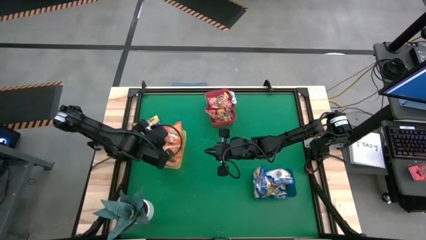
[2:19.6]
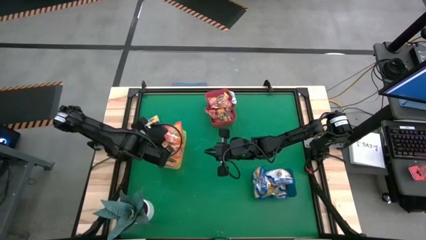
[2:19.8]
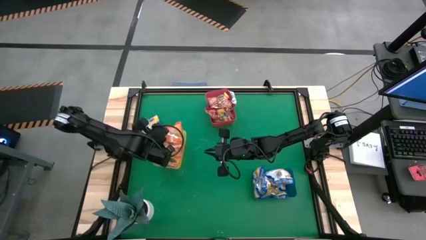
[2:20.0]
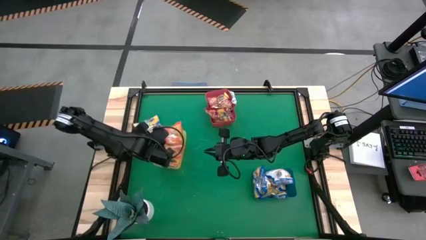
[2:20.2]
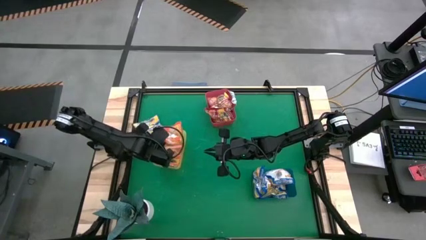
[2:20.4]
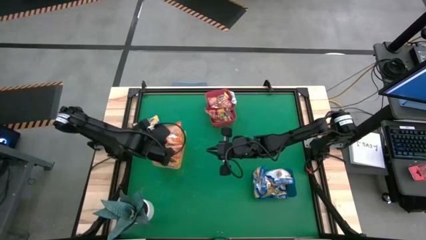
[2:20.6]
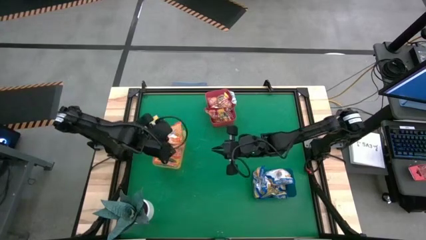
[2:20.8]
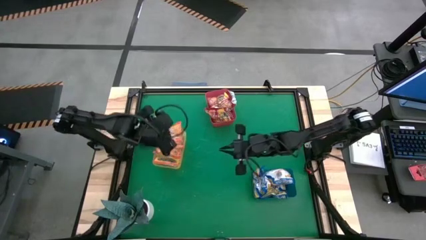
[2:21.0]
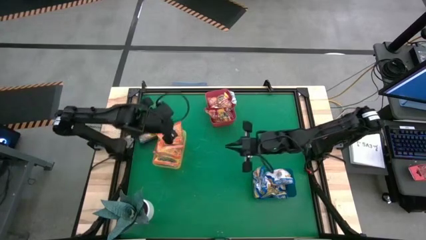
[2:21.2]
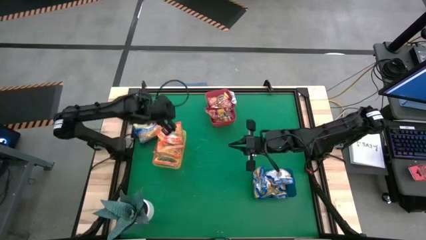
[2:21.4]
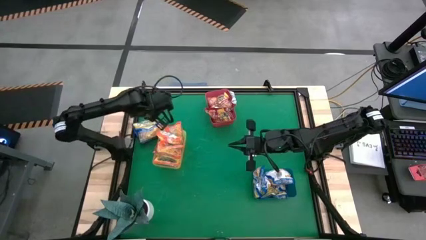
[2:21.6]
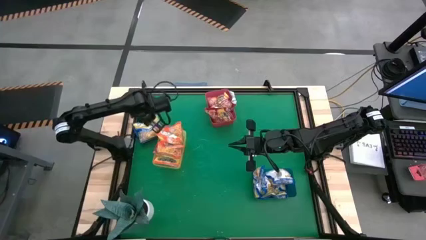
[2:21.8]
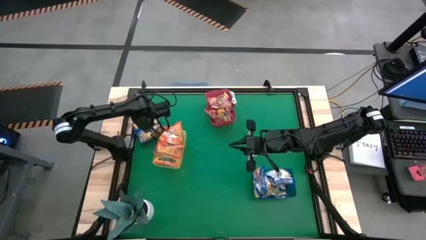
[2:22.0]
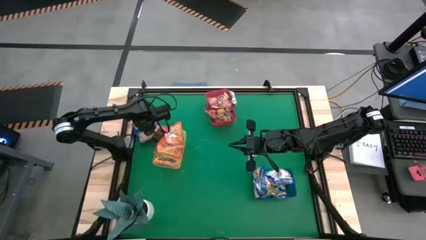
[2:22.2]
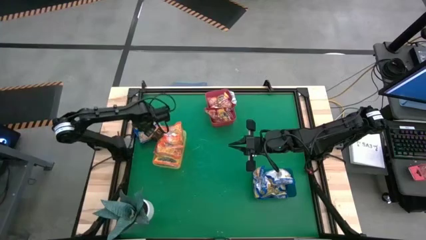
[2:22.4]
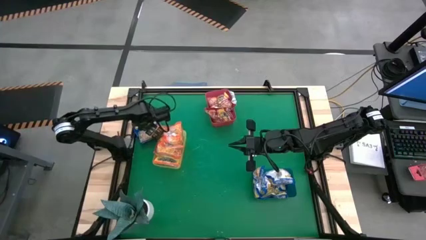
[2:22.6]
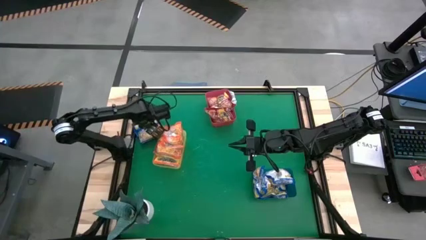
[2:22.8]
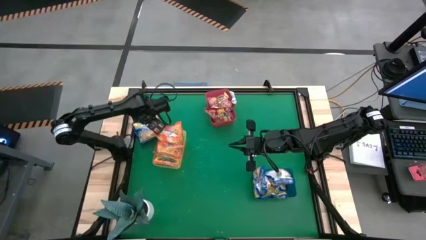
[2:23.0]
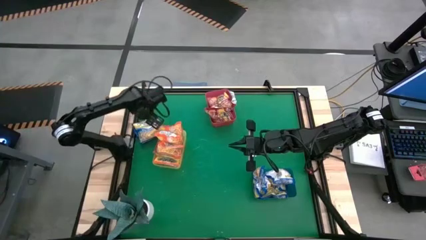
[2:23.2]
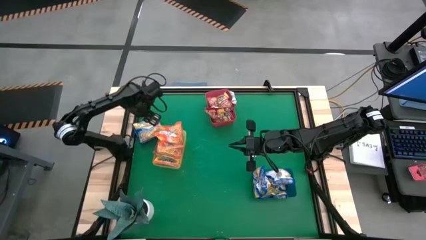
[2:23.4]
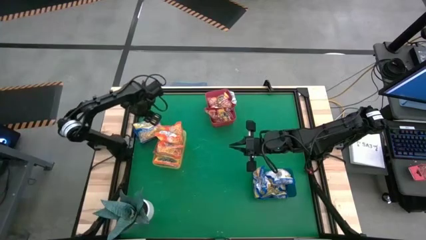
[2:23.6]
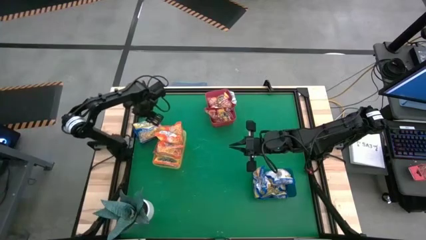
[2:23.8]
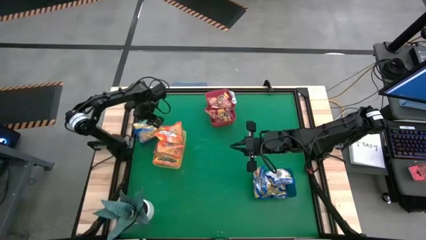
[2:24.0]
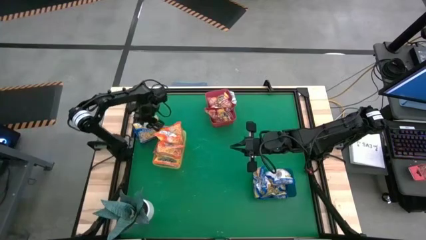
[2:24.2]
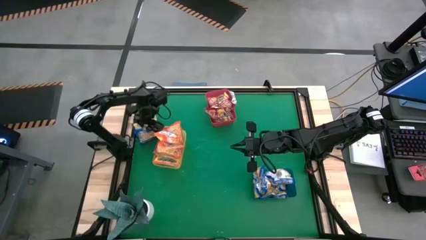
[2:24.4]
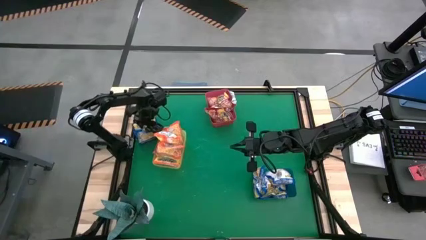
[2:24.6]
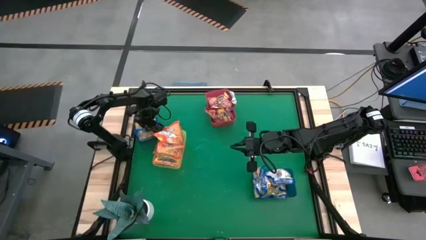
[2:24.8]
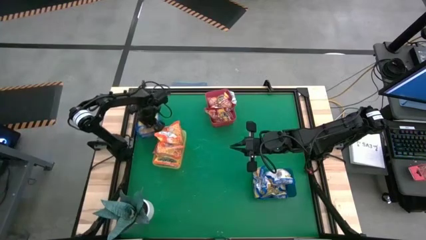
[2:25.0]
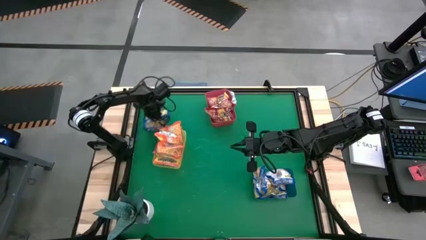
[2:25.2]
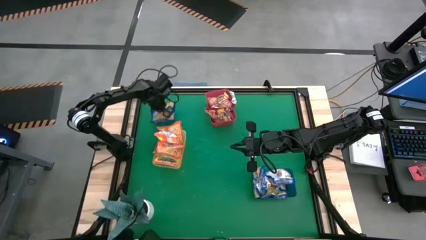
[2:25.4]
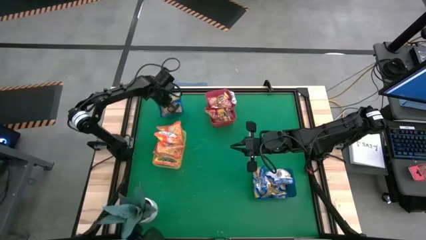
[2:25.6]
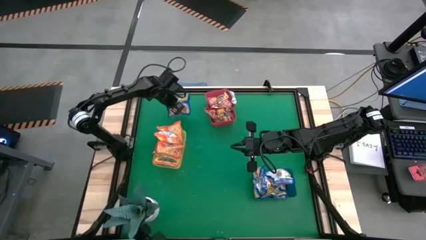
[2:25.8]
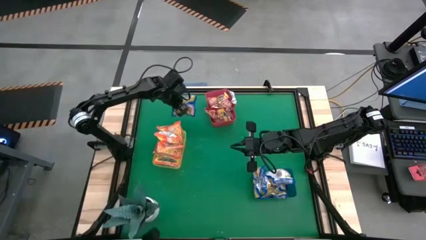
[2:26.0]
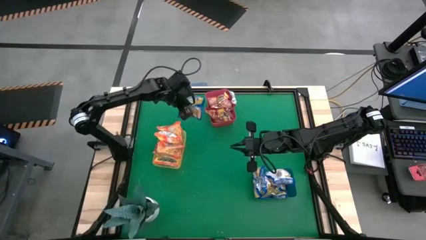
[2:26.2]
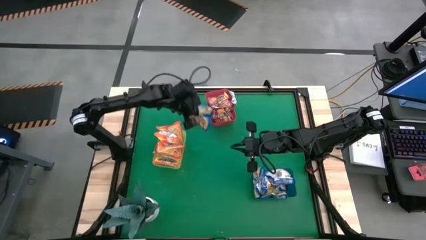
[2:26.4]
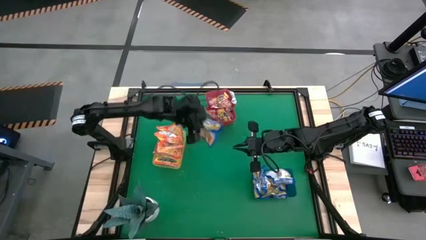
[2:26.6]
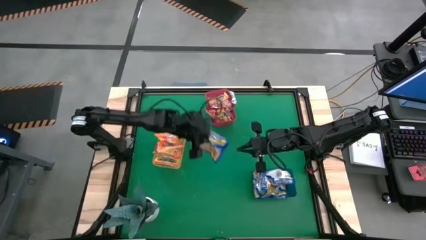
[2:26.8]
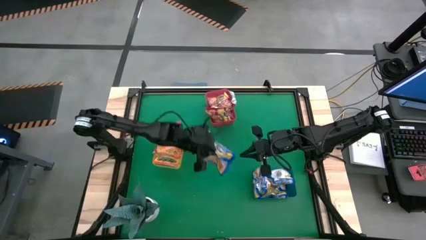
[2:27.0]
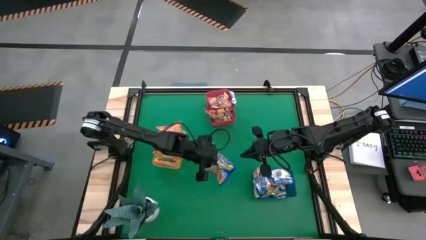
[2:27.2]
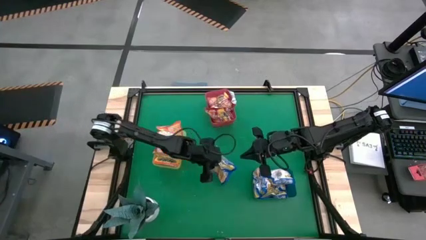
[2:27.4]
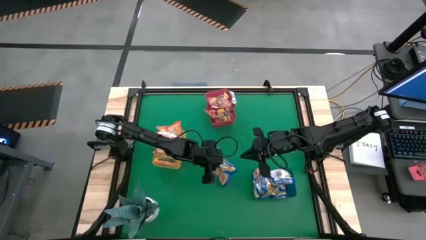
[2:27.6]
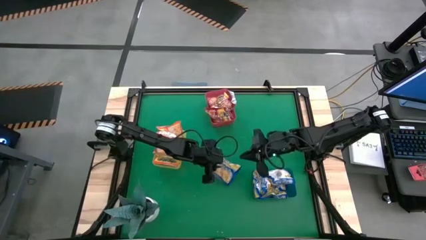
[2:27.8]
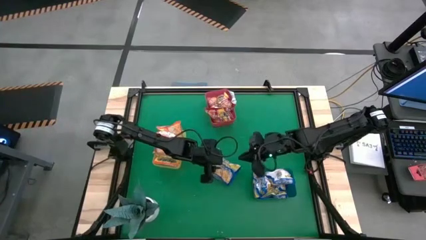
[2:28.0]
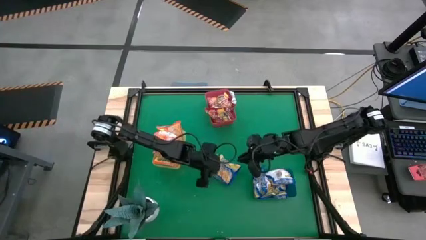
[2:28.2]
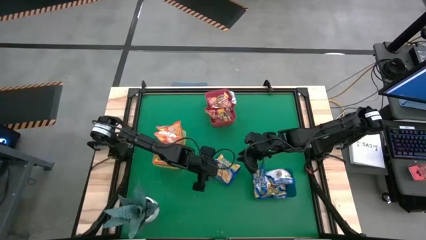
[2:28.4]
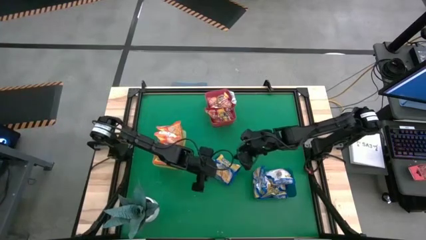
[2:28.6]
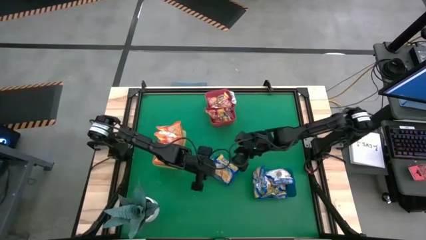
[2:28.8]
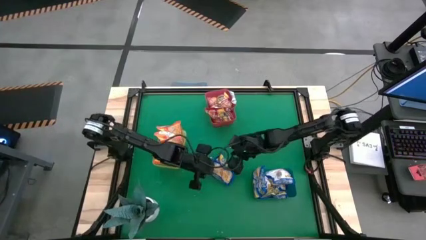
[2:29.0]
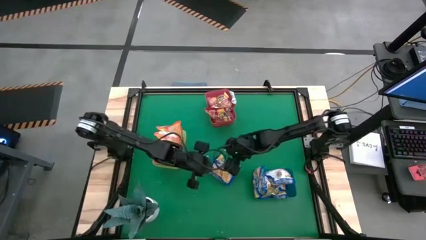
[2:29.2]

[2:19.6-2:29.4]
Task: Sort Maruchan noodles
Put the blue noodle pack into the blue bin

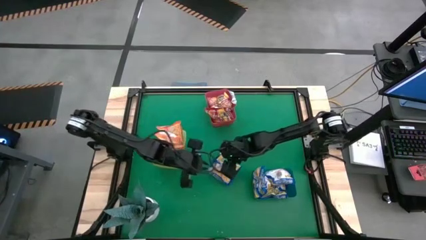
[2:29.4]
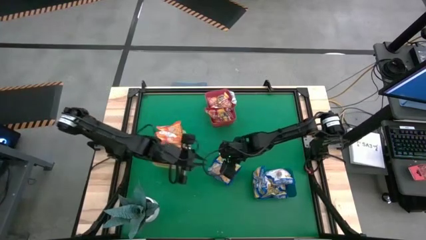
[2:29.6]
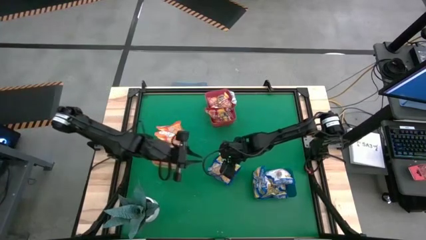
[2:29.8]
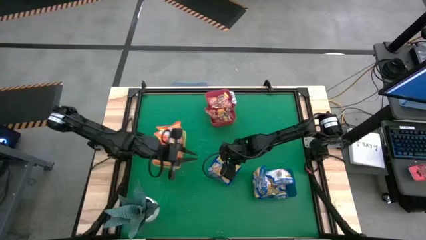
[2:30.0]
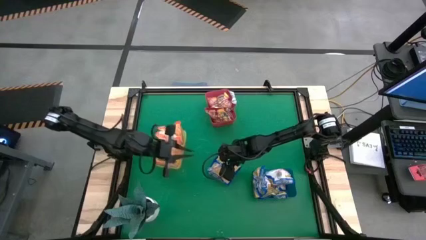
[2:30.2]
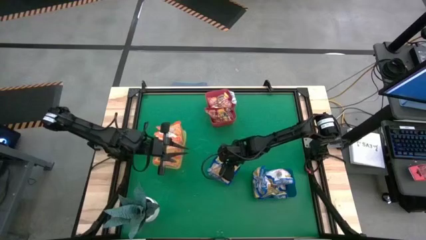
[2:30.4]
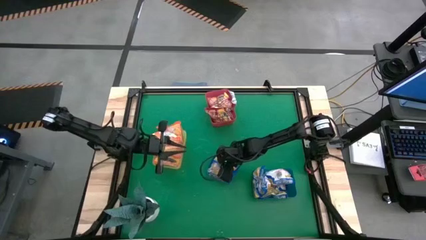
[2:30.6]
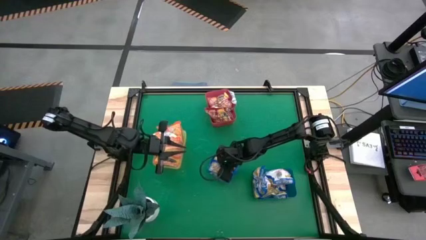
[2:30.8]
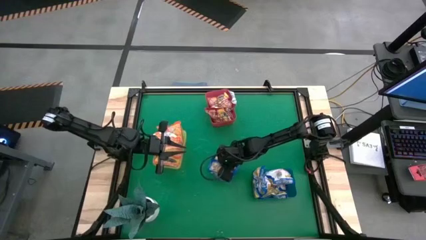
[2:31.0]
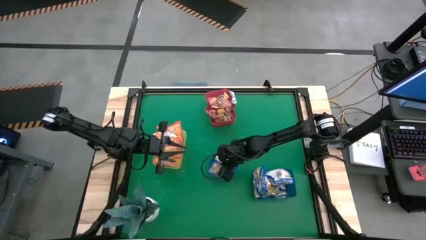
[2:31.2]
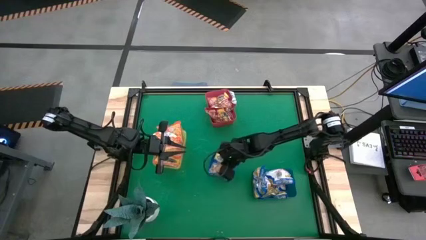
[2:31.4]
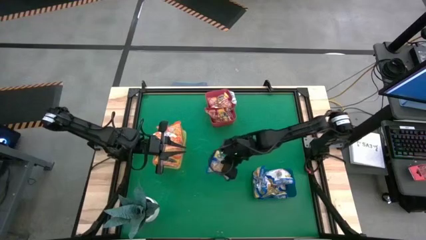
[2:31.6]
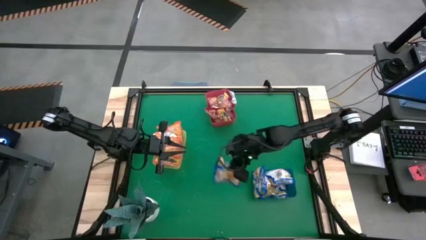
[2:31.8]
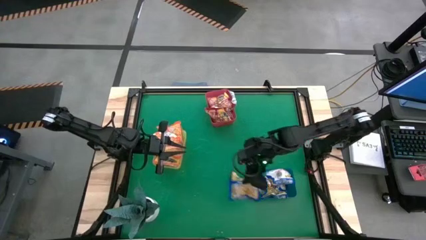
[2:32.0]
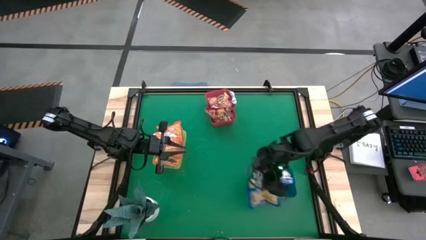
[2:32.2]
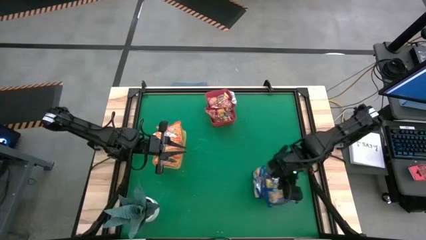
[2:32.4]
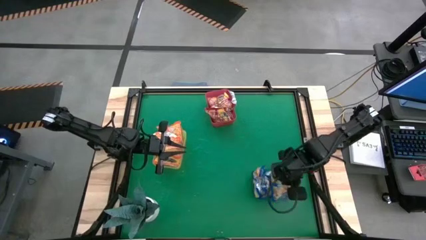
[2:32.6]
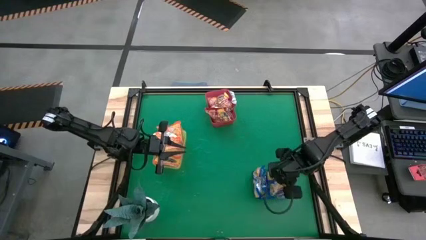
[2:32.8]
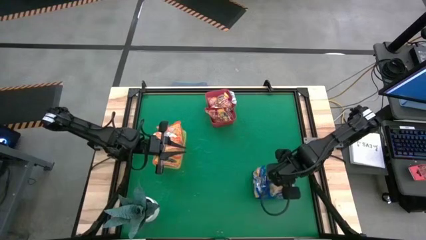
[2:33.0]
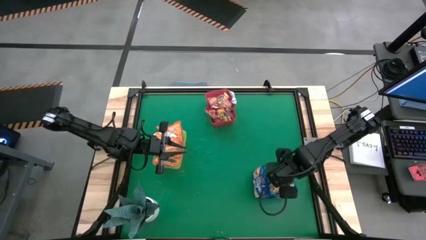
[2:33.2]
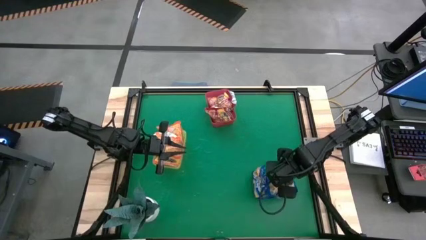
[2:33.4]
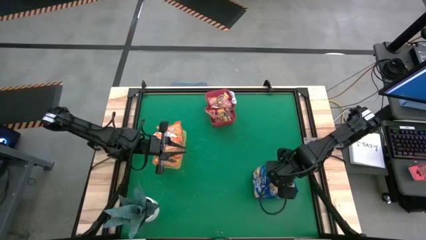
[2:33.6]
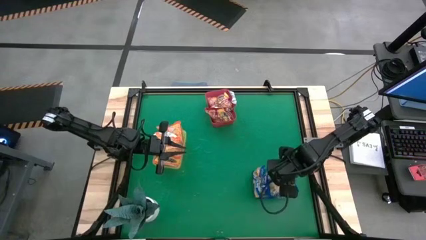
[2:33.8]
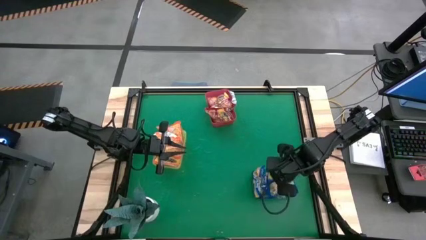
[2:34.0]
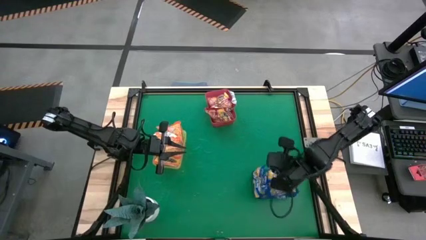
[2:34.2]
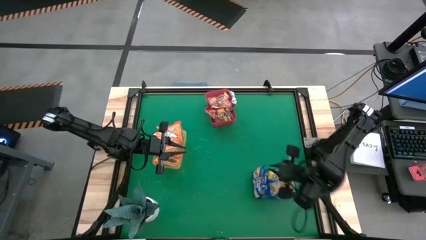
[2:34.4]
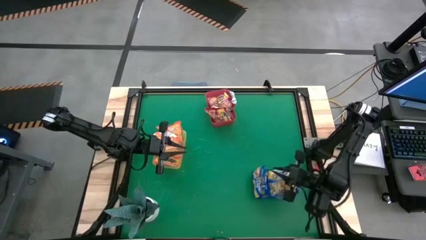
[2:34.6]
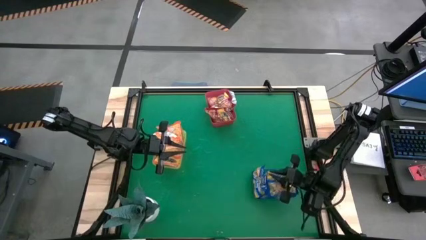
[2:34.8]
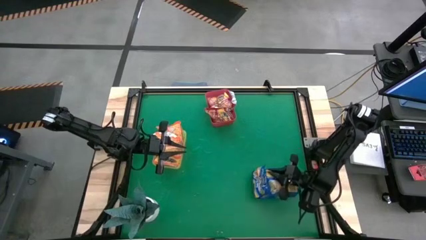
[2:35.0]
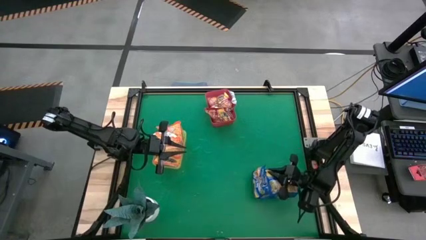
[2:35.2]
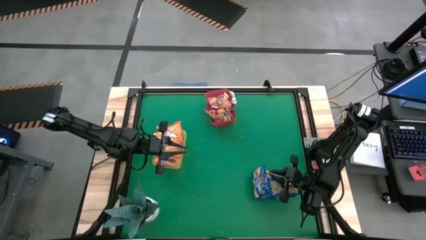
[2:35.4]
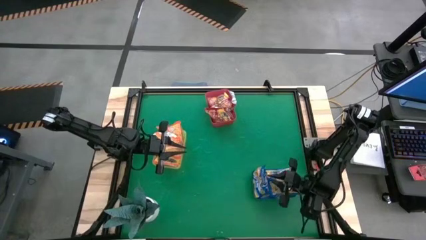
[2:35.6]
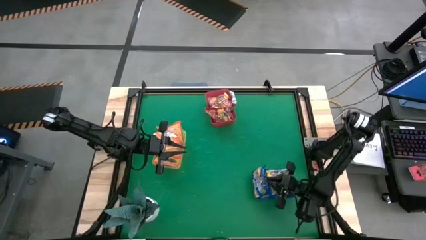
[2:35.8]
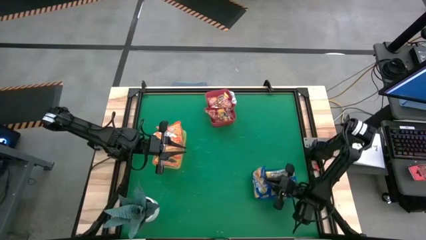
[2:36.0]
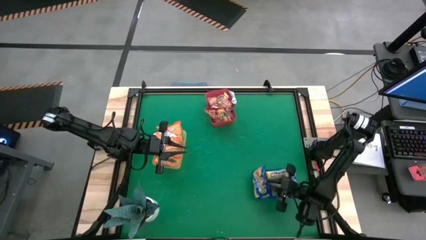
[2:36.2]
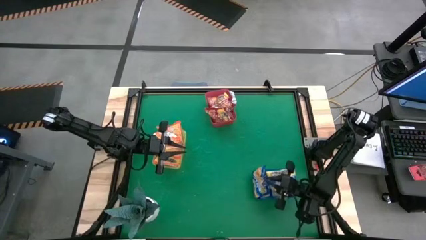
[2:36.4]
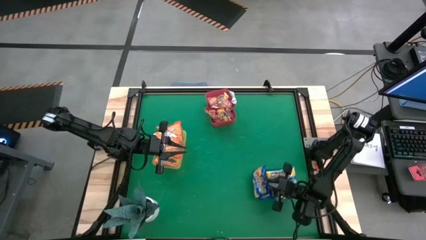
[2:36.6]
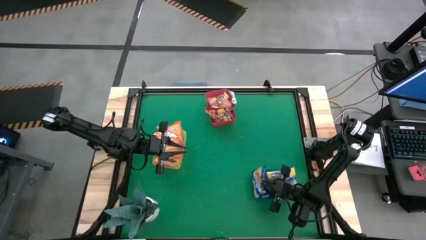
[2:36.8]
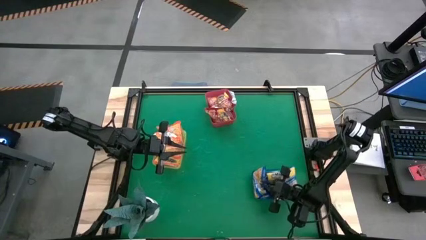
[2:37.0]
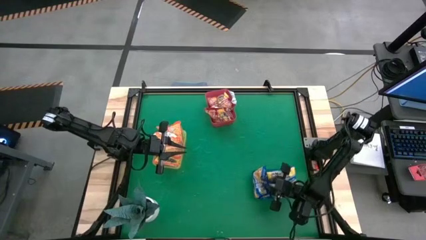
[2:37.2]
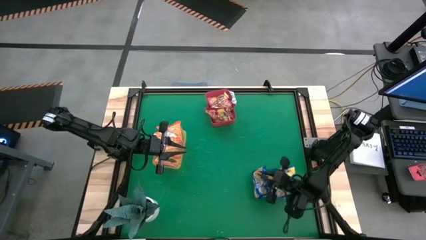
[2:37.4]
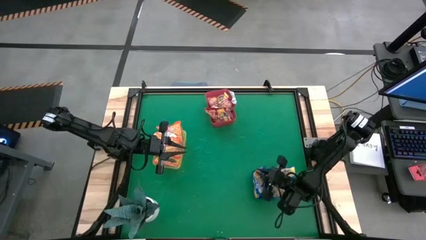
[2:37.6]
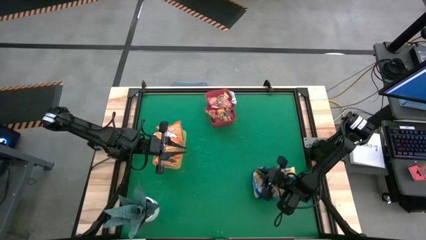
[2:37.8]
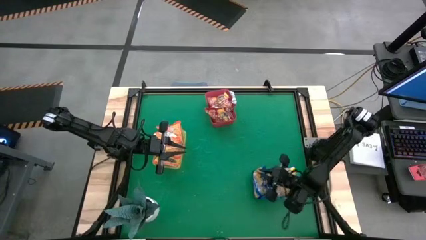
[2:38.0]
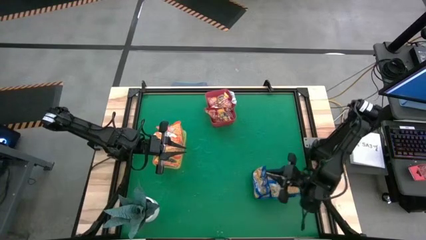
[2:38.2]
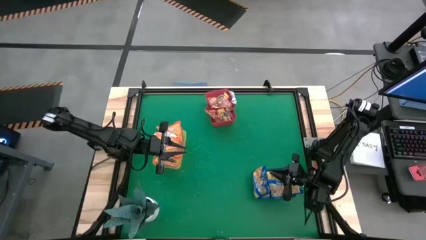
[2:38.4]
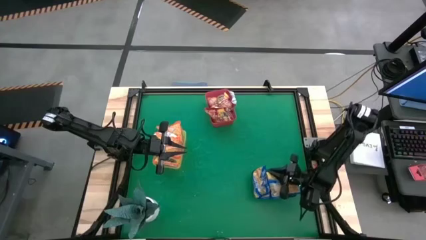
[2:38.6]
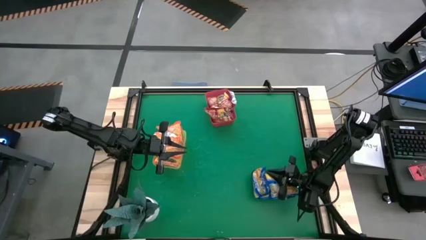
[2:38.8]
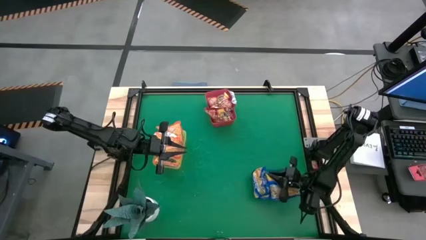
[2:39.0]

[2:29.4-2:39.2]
Put the blue noodle pack into the blue bin
